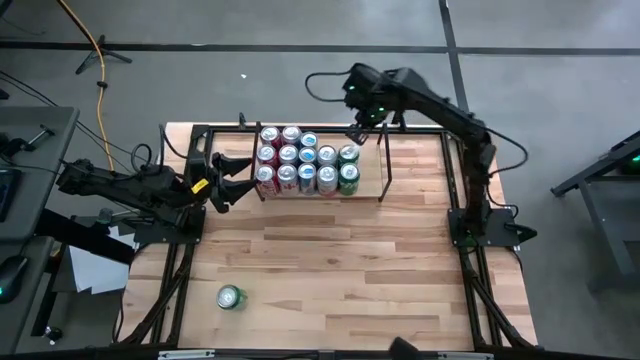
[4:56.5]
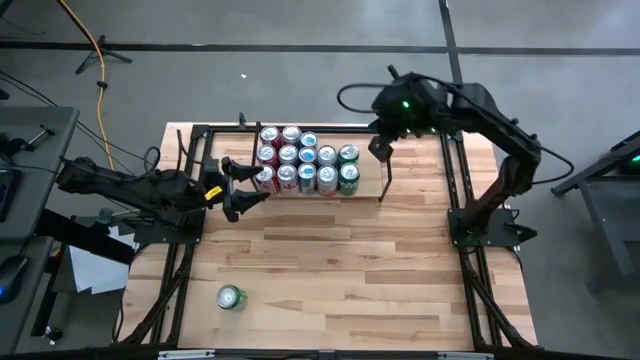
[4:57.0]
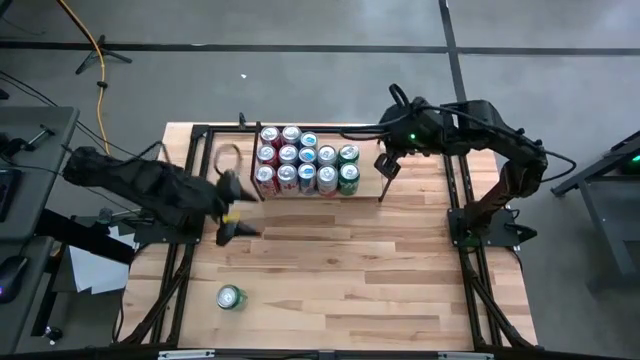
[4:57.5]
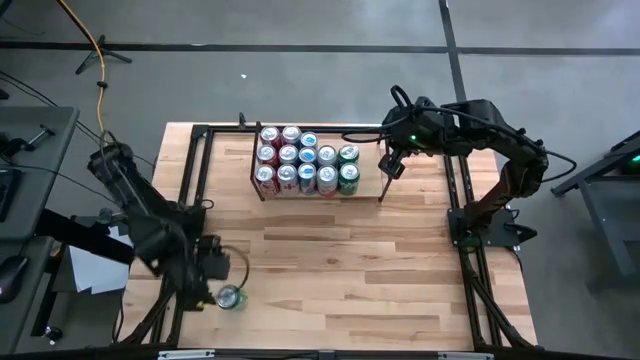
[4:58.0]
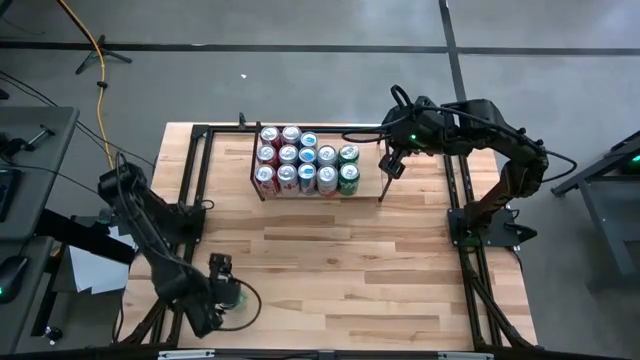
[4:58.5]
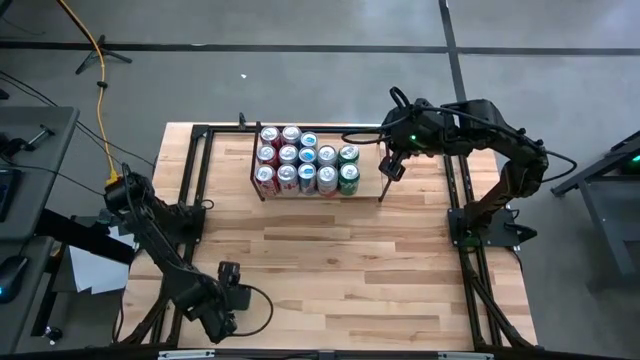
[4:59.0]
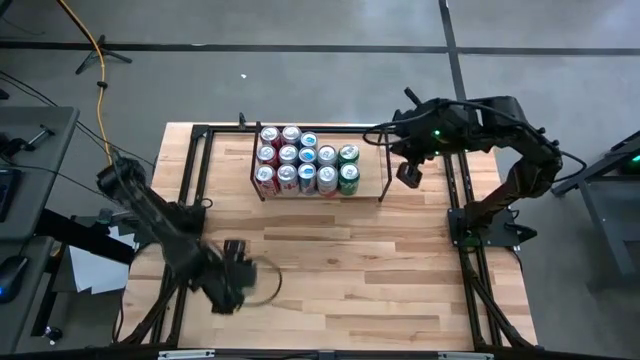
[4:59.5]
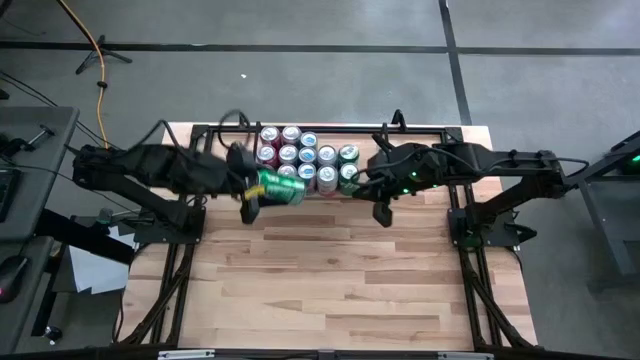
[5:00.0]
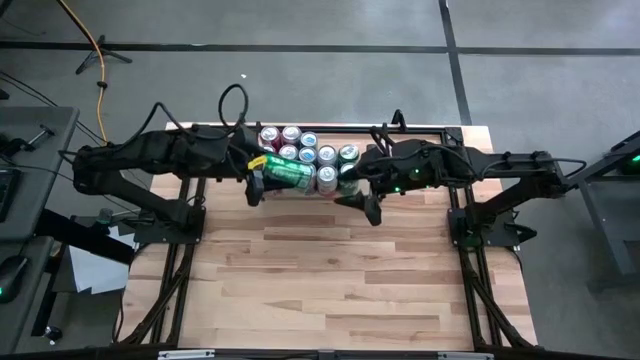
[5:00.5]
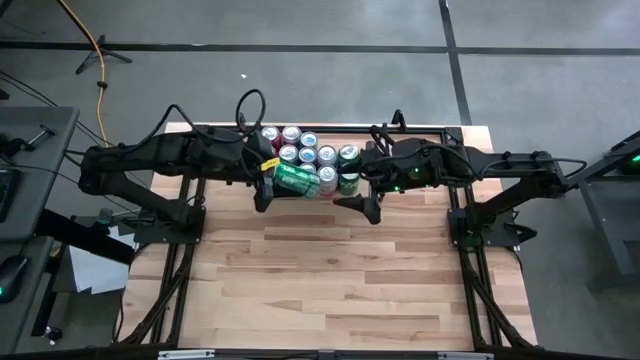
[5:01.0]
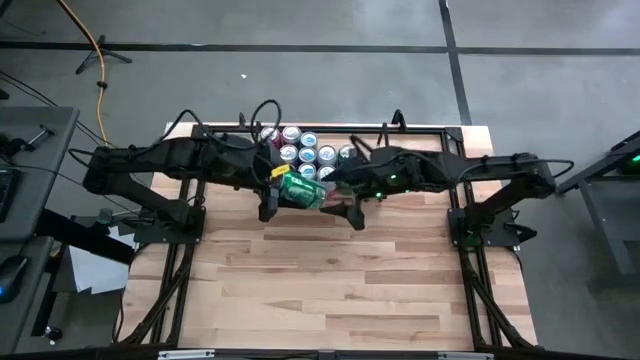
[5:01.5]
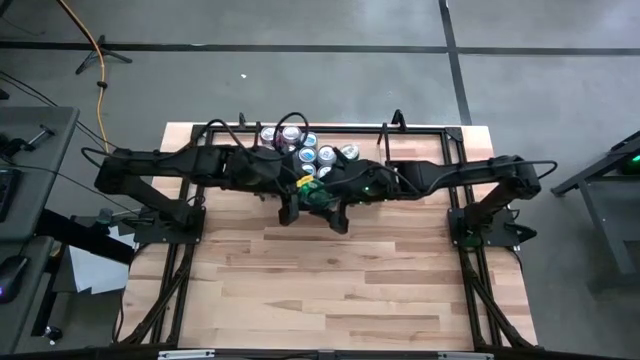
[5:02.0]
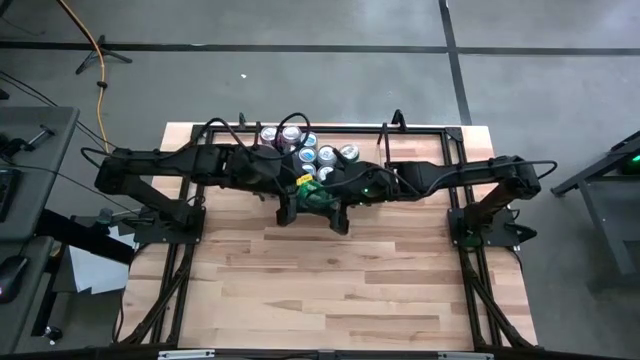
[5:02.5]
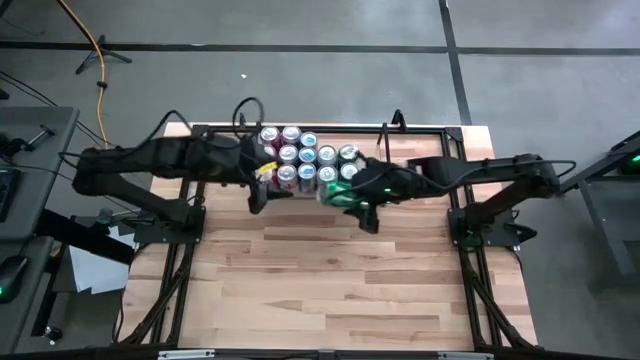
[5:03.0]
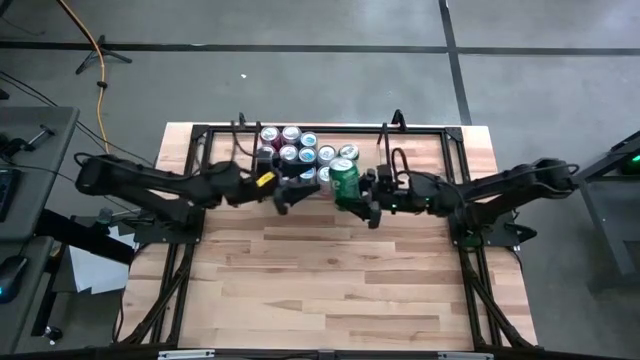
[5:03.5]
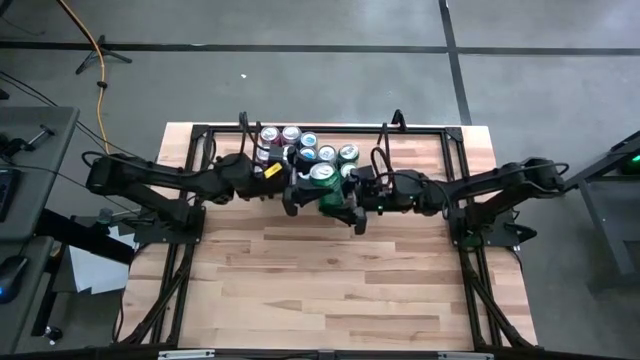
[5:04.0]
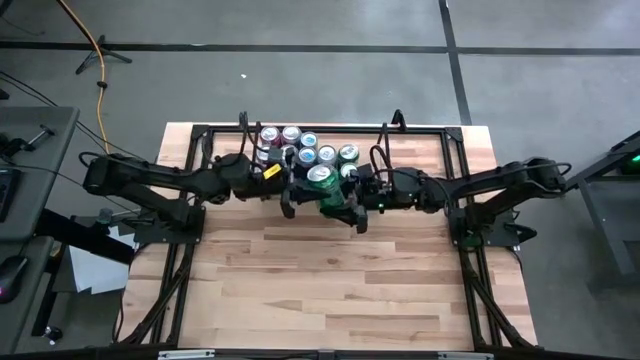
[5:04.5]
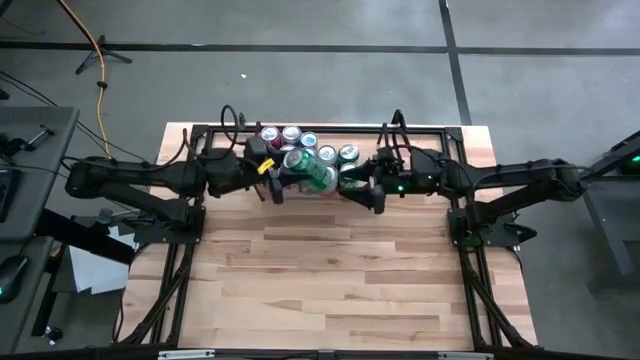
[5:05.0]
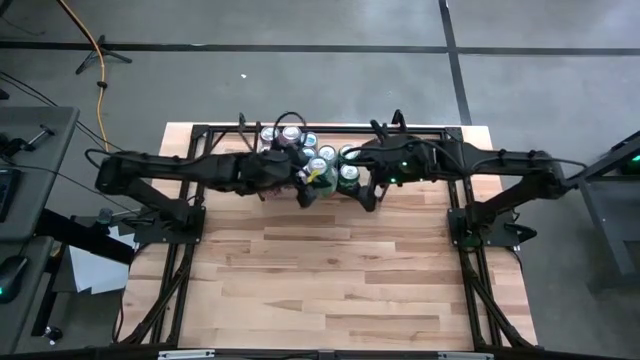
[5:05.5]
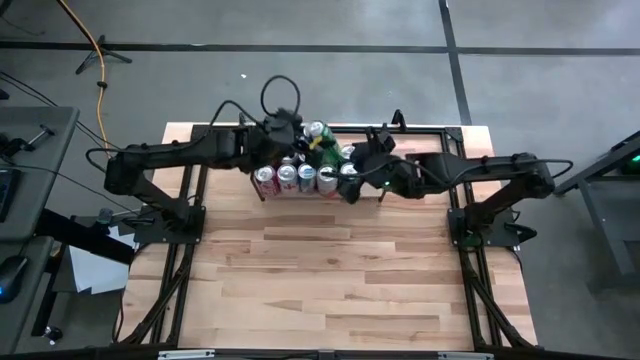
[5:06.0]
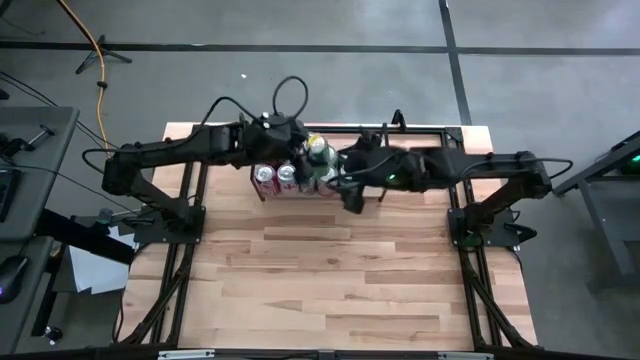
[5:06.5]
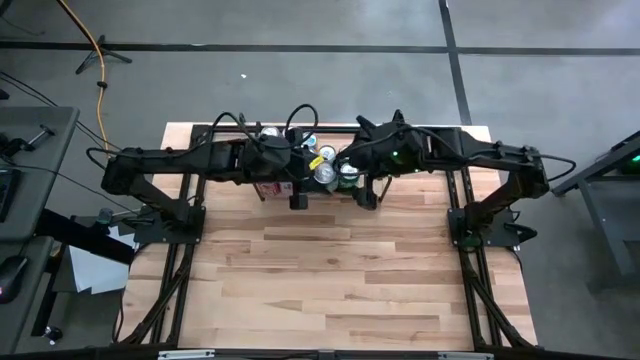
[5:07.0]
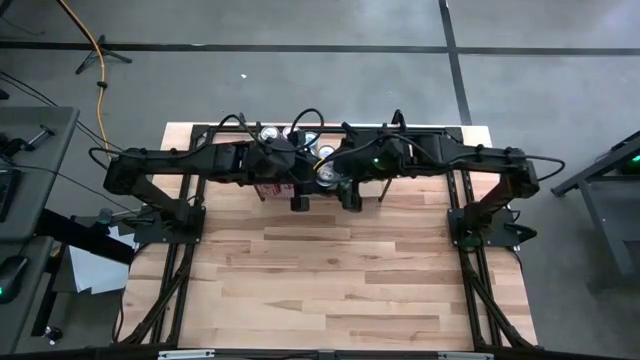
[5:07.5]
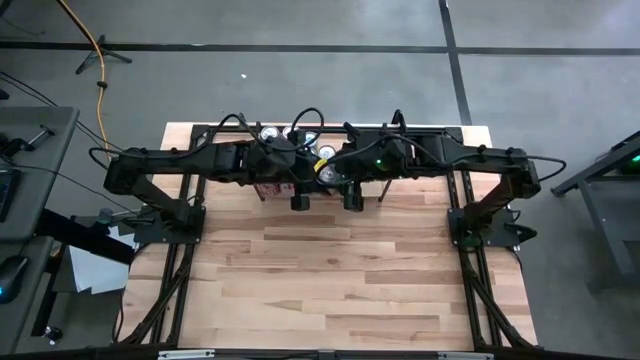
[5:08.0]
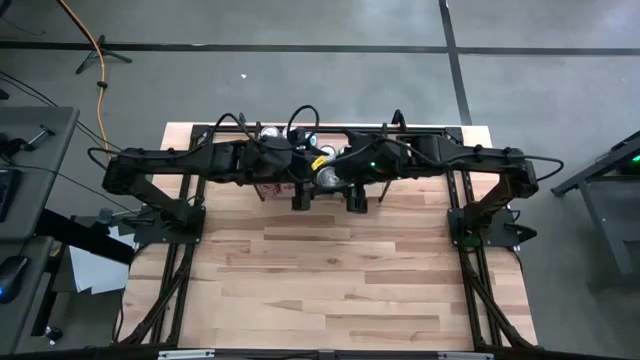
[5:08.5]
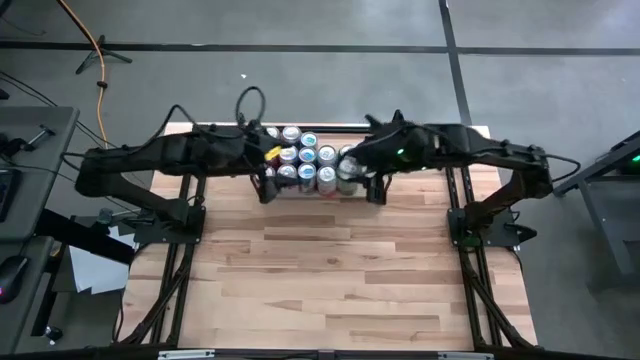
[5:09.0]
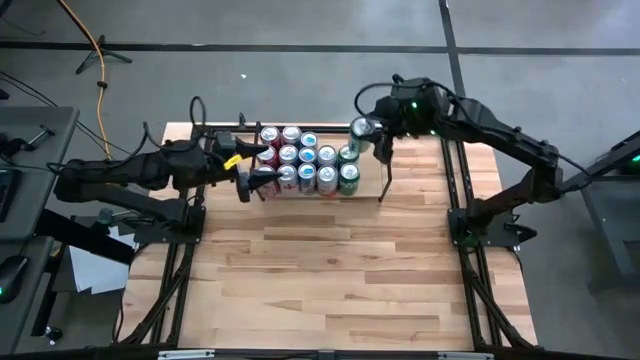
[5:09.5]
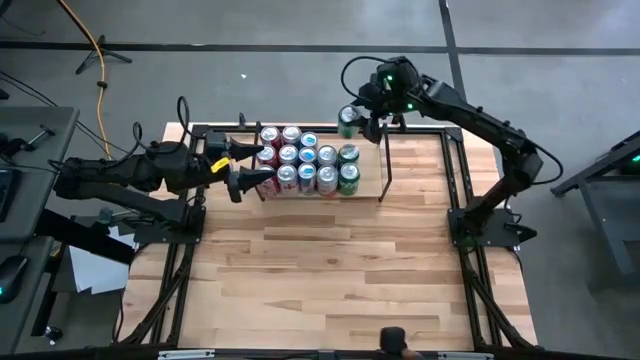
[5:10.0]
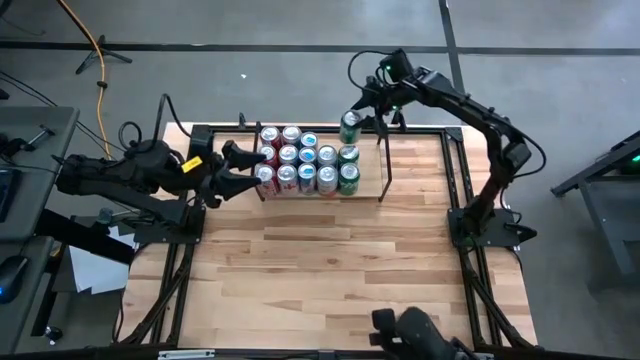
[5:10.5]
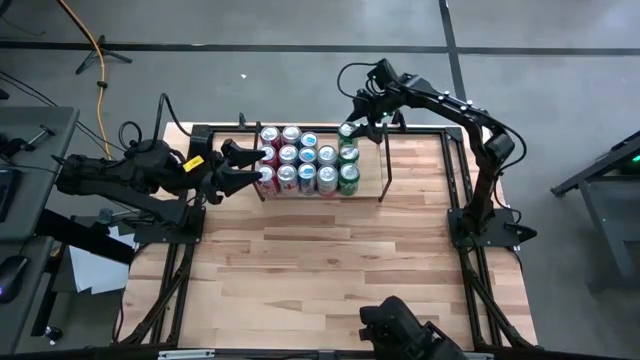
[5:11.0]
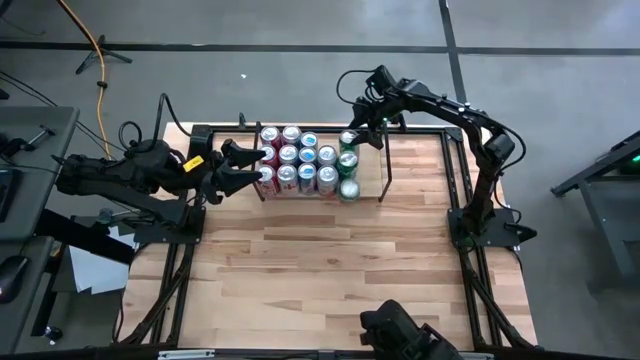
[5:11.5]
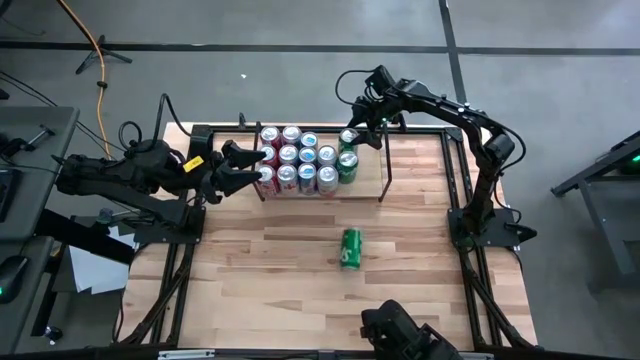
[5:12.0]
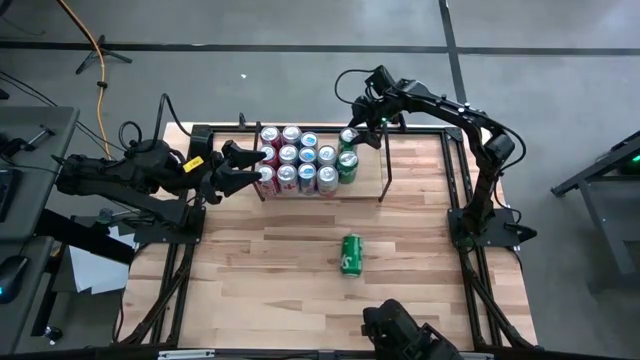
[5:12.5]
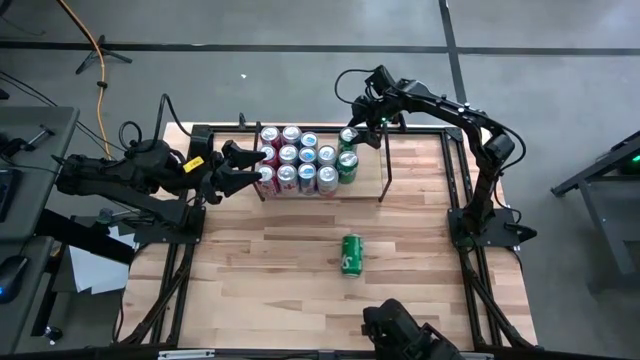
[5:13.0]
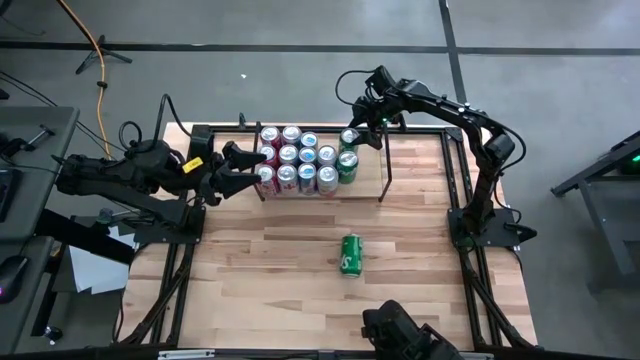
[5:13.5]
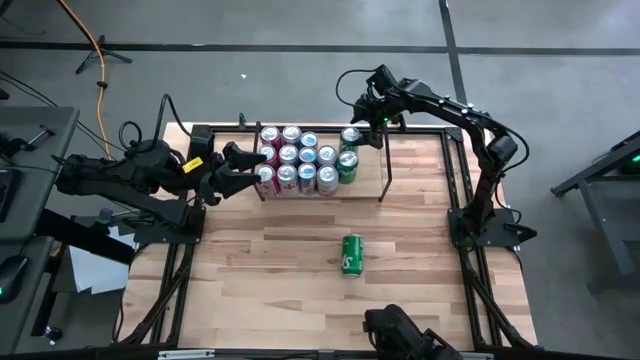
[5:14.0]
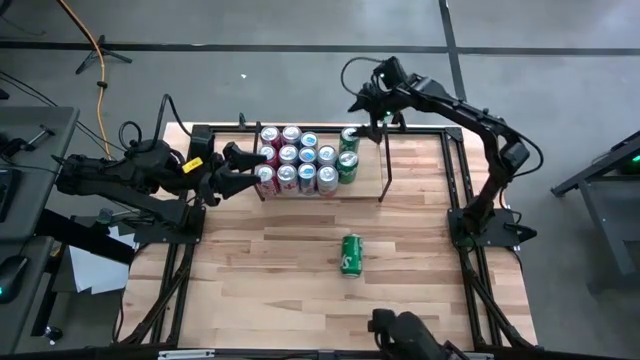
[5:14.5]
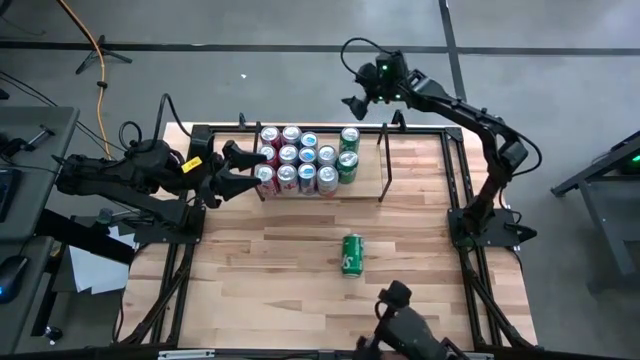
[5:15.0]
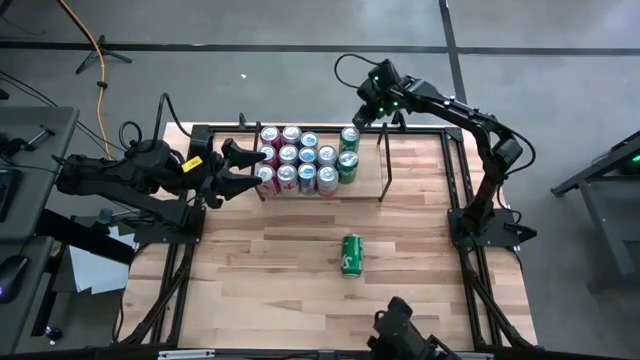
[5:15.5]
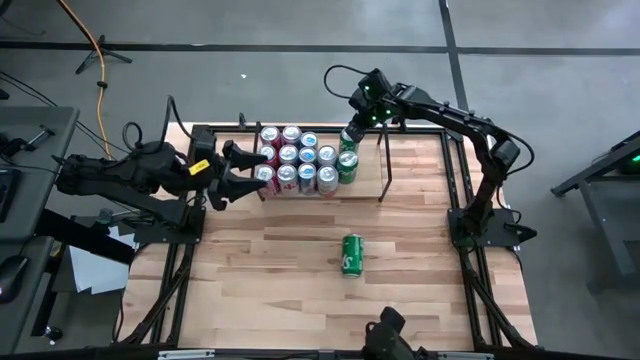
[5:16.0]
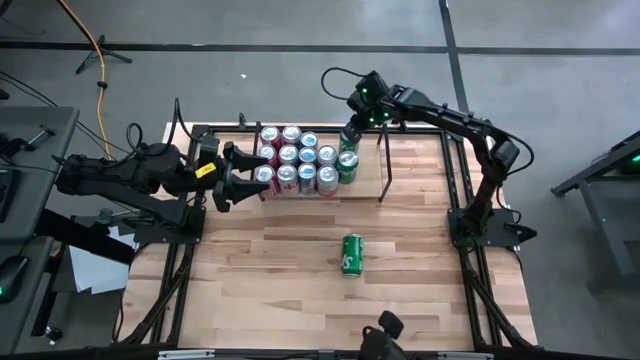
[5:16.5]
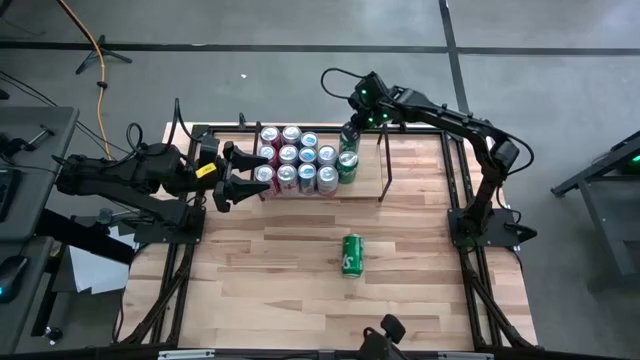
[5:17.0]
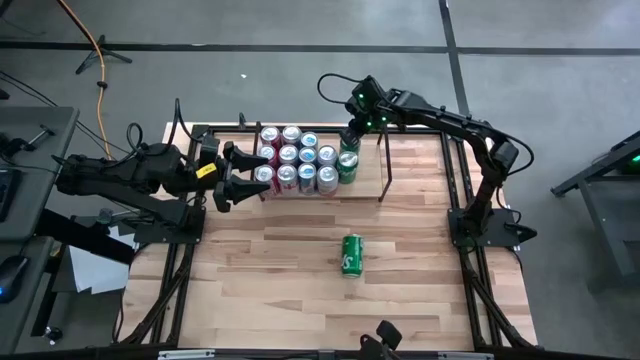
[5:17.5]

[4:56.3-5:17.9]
Task: Place canned beverage on shelf
Put the green soda can on the shelf aligned with the other green soda cans
